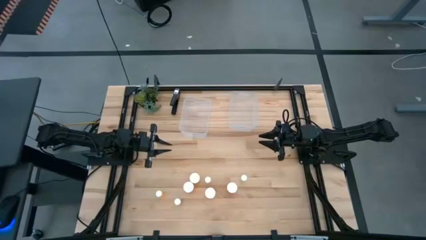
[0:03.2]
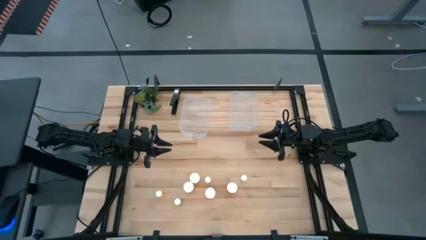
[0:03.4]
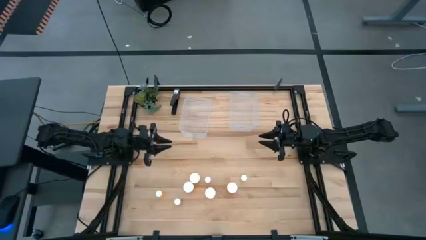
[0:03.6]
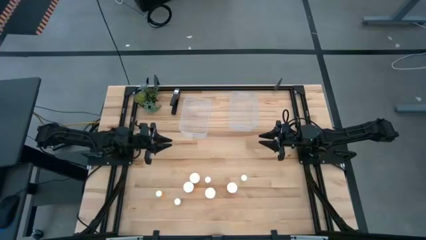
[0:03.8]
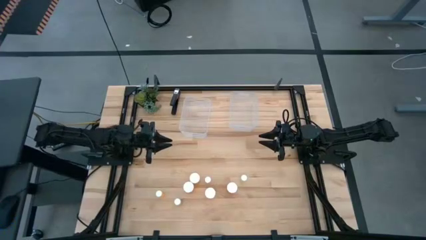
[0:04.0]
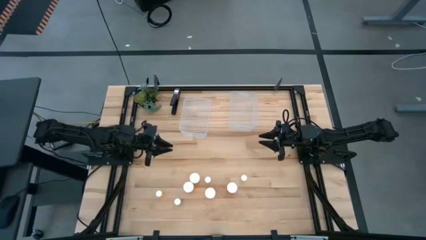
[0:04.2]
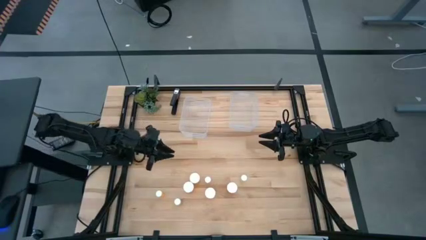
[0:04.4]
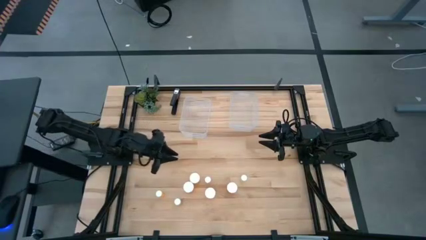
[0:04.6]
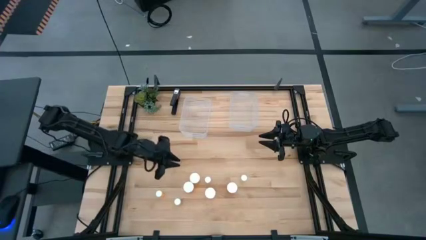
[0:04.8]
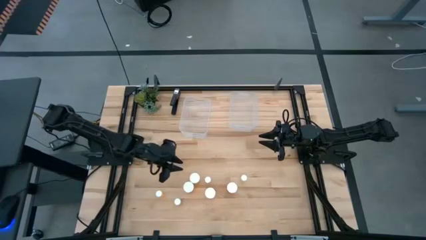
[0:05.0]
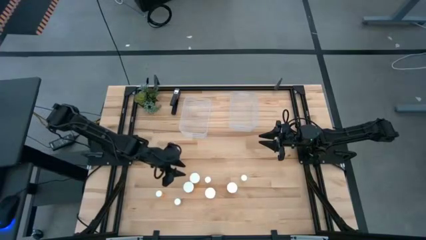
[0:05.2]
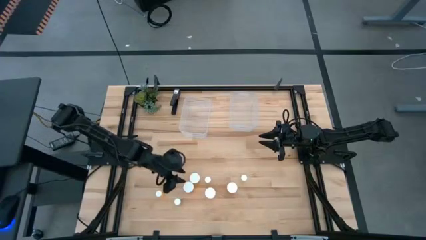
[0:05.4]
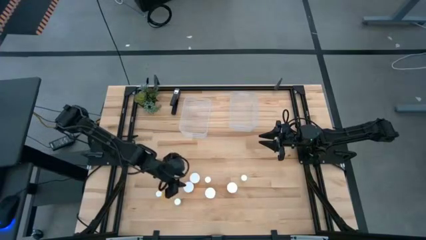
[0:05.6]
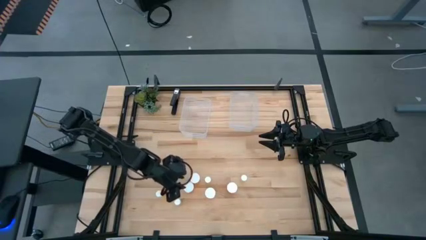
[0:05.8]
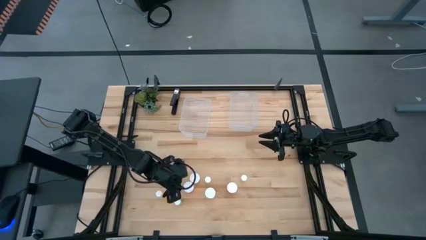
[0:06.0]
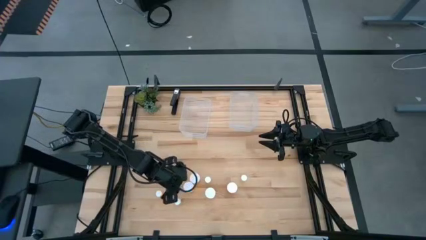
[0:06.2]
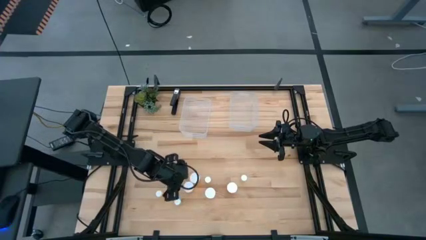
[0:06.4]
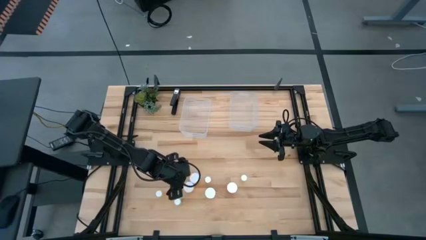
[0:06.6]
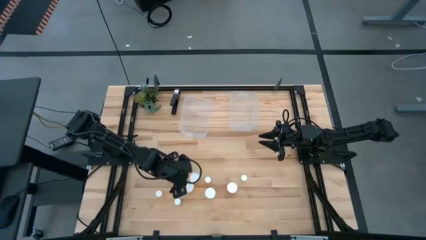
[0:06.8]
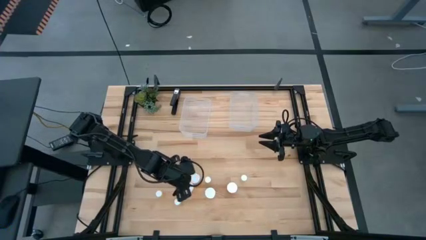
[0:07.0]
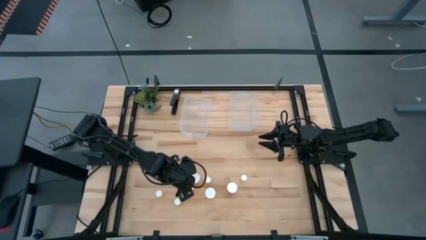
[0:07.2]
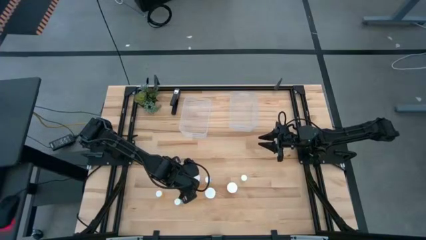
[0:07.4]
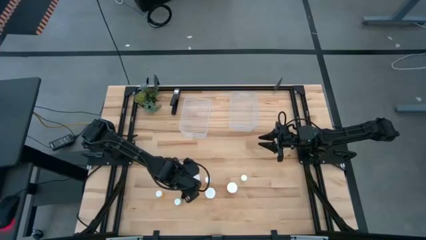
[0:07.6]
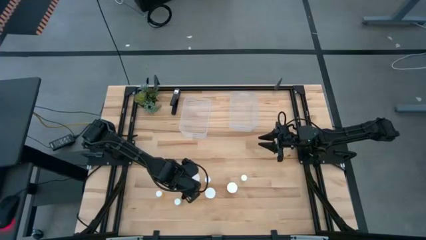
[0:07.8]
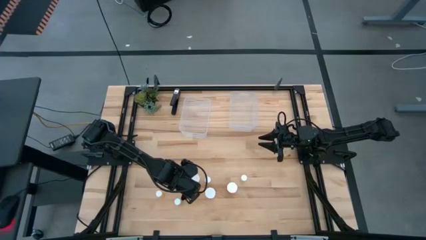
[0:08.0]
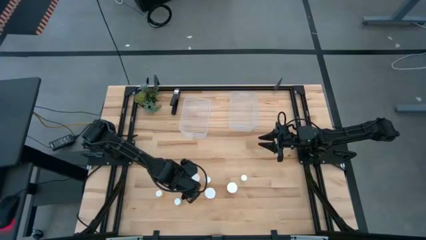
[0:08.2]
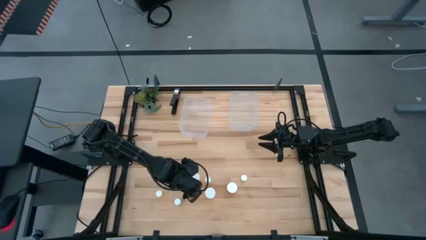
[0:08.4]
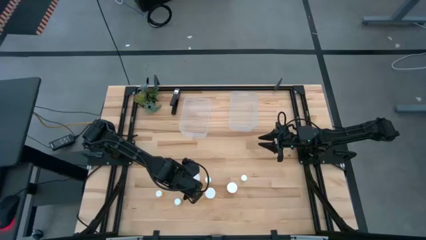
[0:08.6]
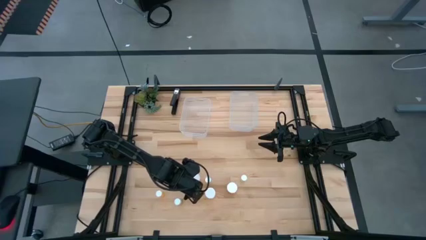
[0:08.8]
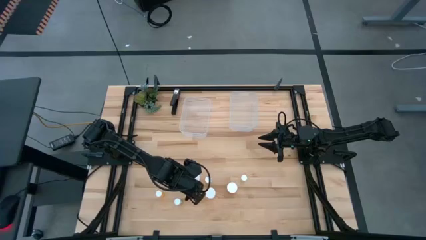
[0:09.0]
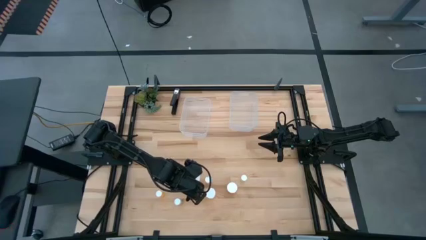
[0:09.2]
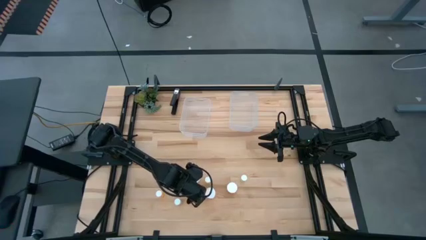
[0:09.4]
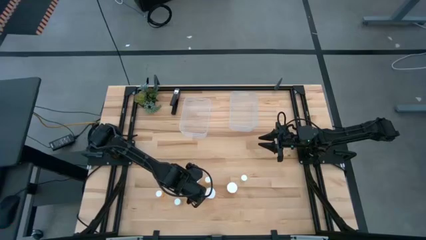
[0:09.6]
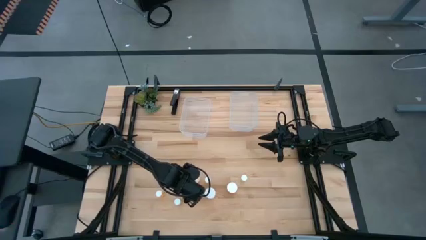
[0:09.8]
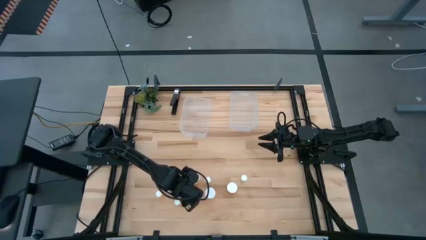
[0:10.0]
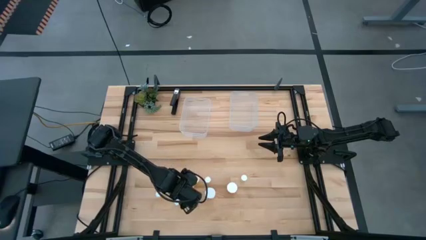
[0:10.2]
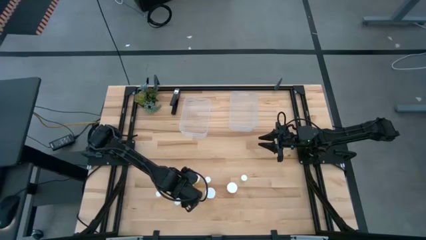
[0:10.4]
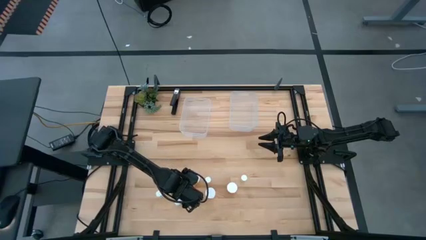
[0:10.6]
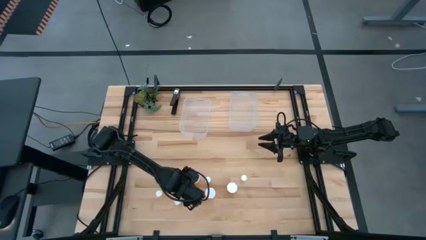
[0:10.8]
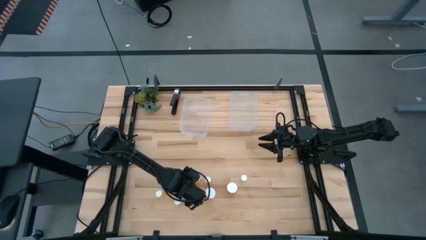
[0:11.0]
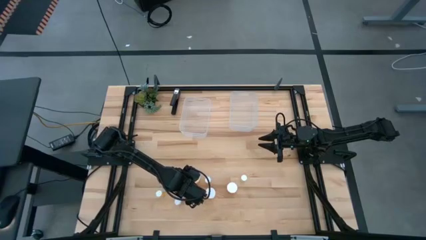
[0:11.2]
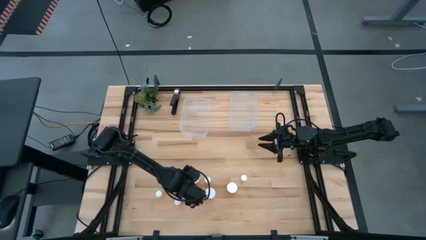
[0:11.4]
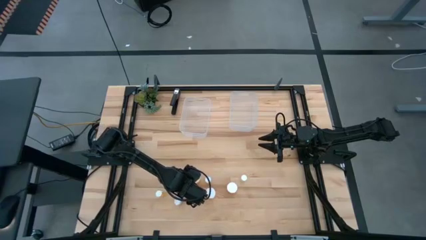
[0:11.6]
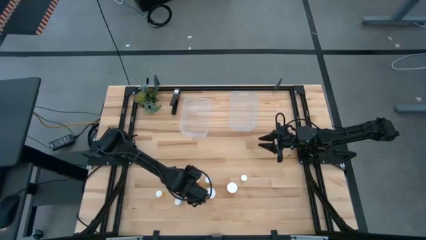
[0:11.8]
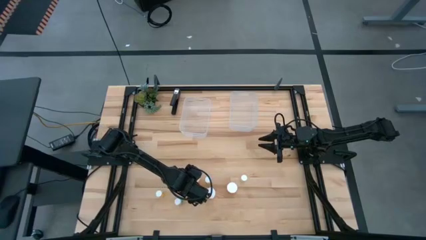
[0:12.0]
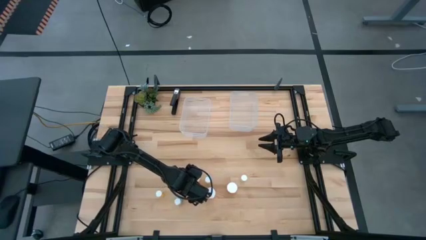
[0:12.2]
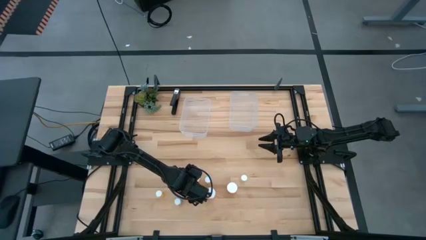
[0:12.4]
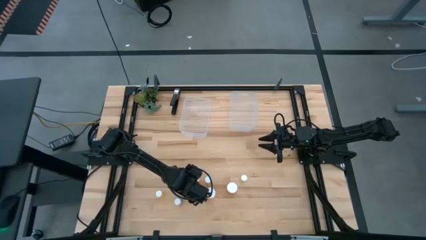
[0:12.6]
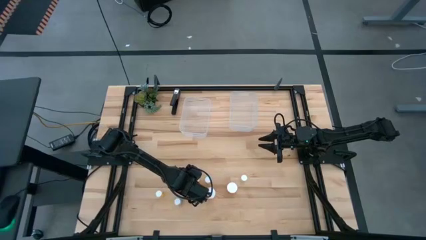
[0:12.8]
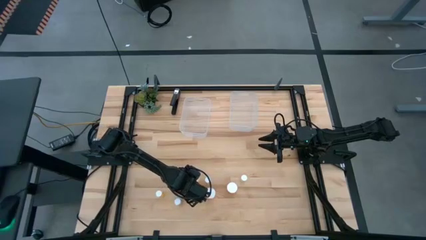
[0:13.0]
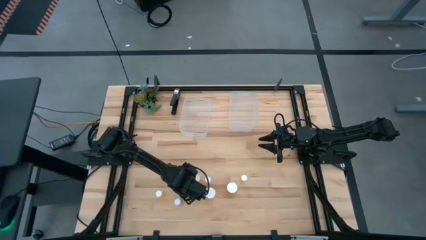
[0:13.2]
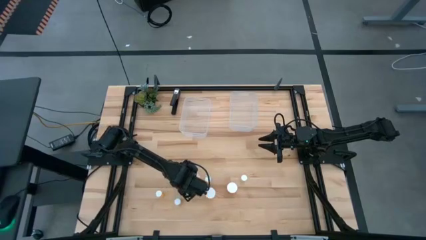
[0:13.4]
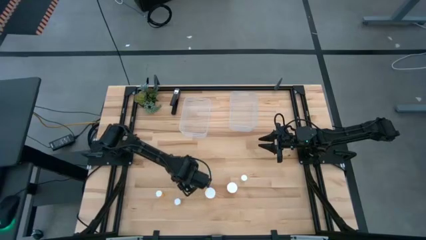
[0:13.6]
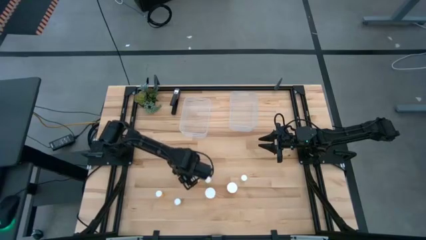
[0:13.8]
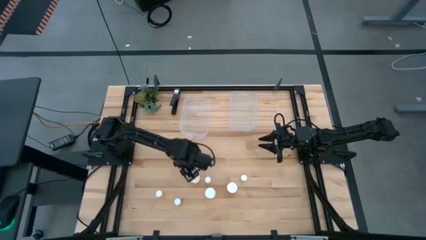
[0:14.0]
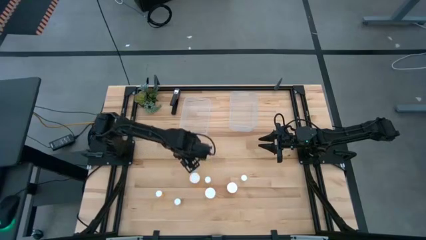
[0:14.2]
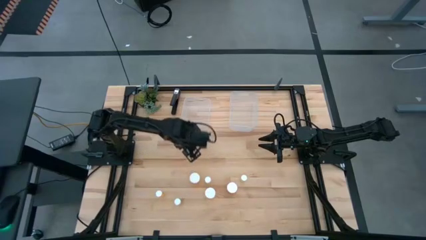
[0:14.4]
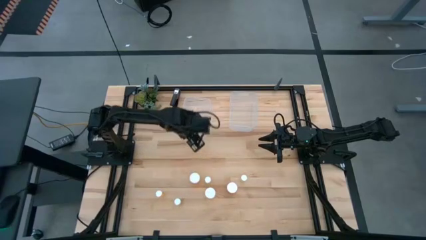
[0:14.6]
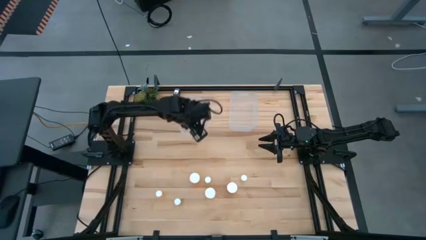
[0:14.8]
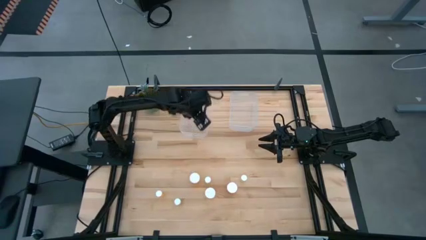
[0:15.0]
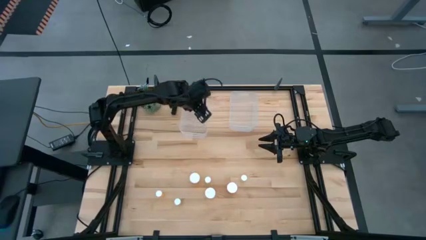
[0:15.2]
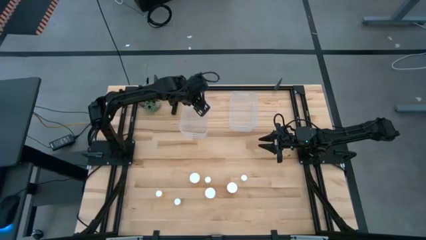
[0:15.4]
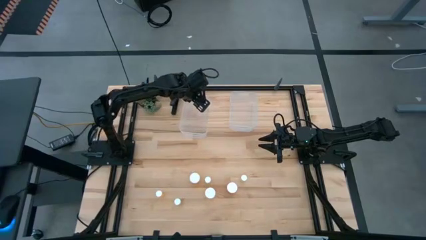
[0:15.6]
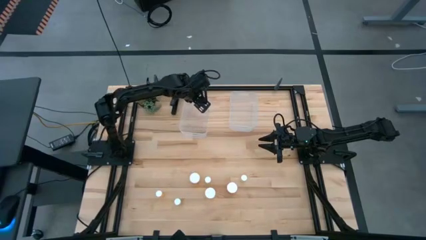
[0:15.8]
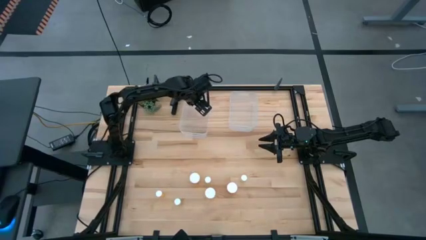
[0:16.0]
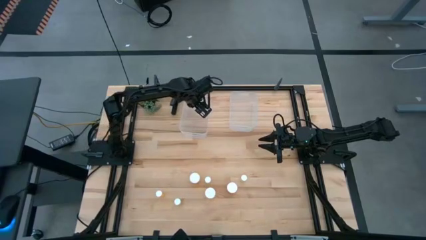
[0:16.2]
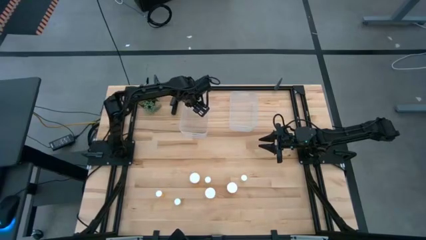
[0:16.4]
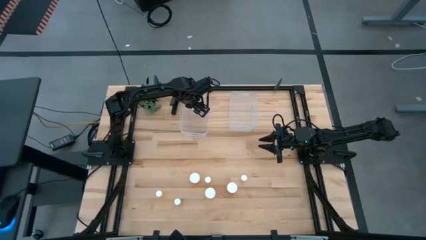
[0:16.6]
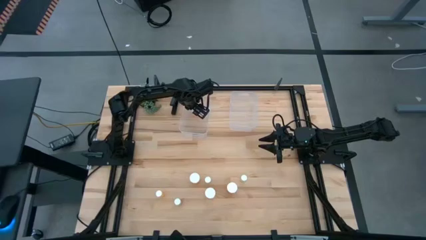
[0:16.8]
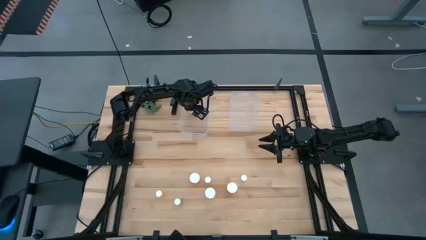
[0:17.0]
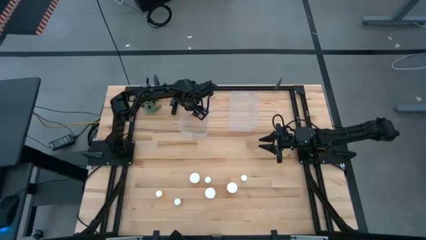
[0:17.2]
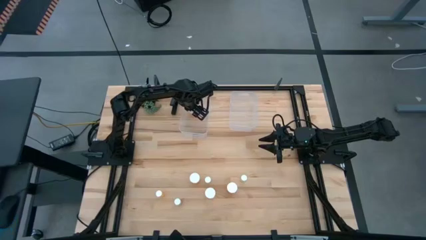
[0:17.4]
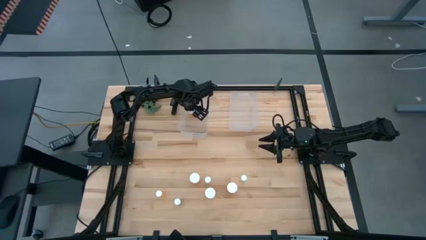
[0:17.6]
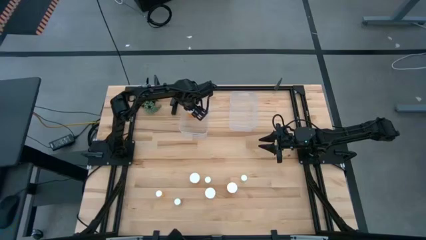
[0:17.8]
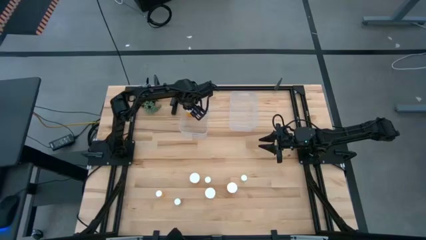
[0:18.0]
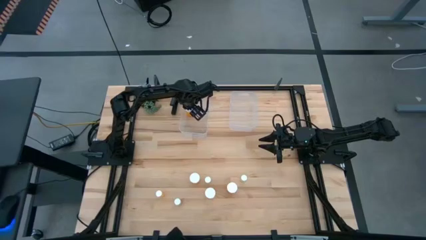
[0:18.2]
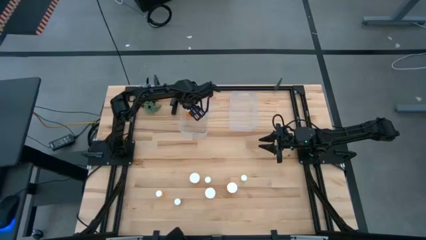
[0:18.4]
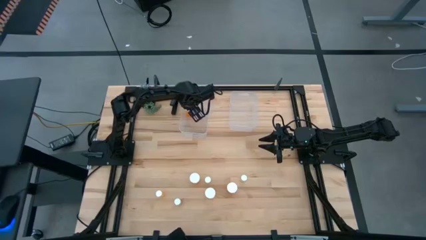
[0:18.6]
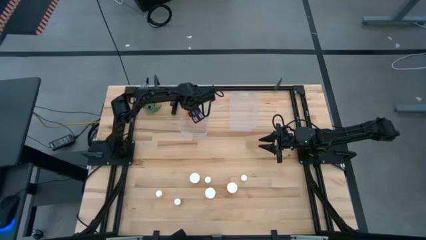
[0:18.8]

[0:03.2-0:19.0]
Task: Pick and place medicine bottles into bin by pill shape (circle, oval)
Put the big orange pill bottle in the left transparent bin
